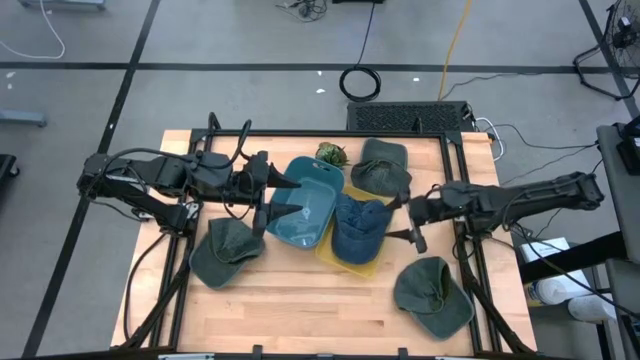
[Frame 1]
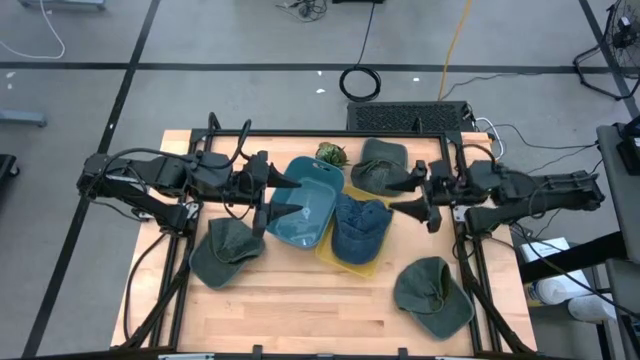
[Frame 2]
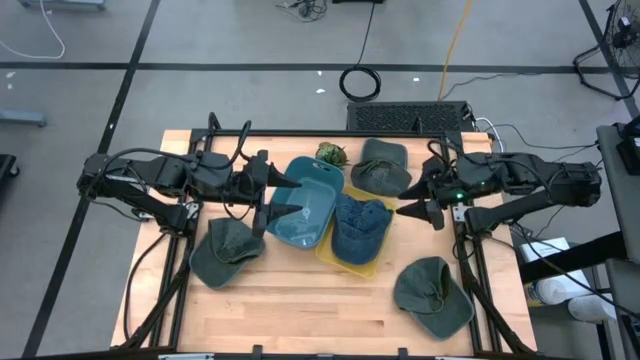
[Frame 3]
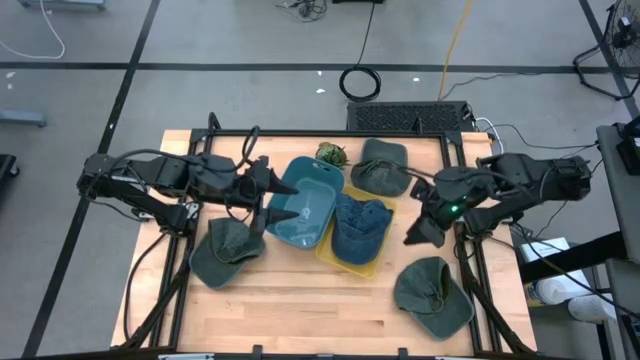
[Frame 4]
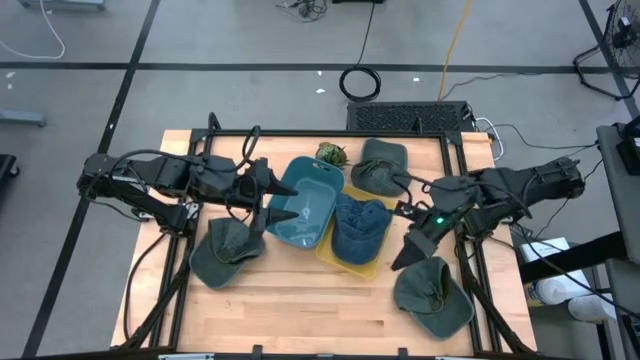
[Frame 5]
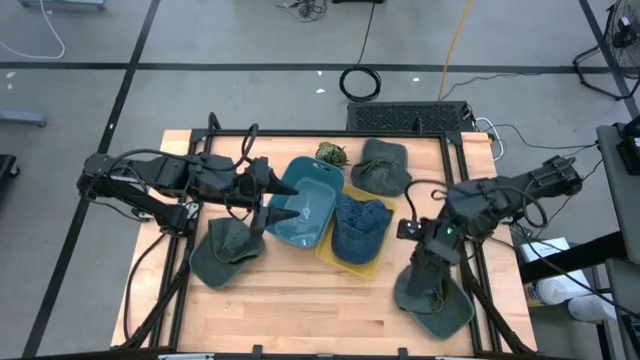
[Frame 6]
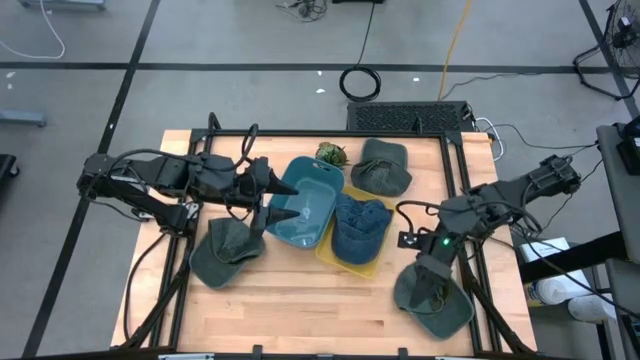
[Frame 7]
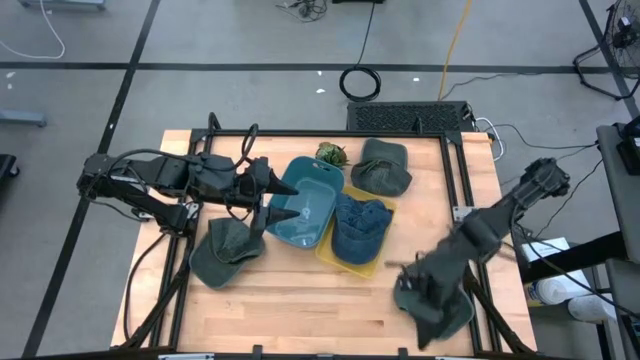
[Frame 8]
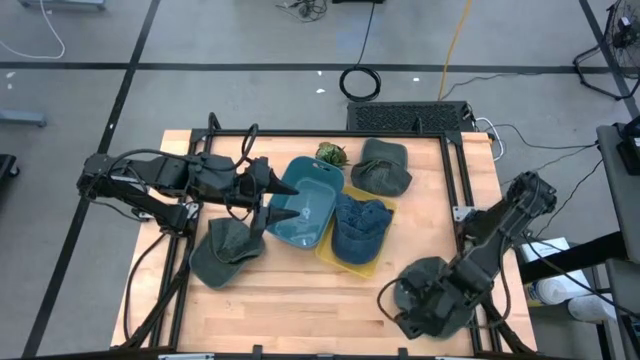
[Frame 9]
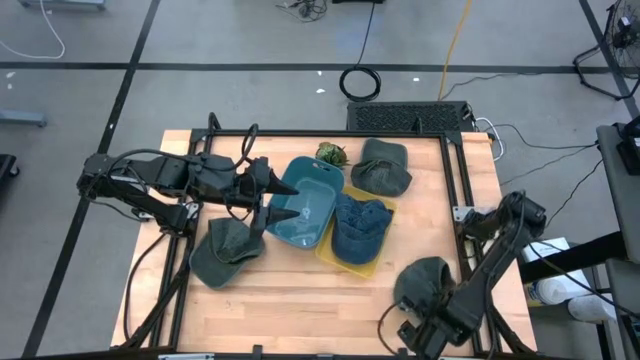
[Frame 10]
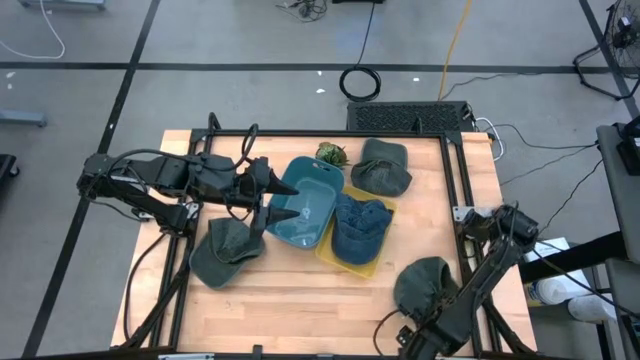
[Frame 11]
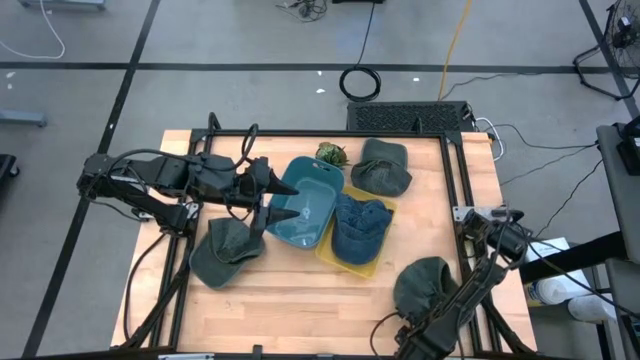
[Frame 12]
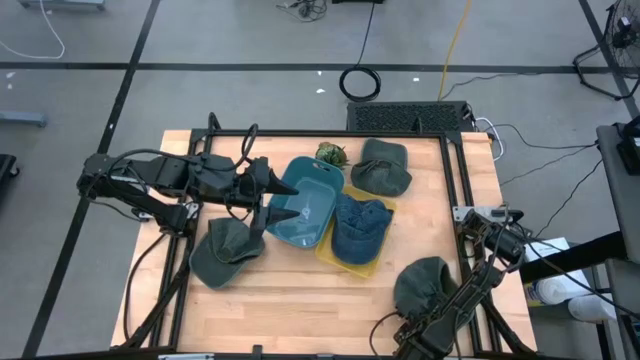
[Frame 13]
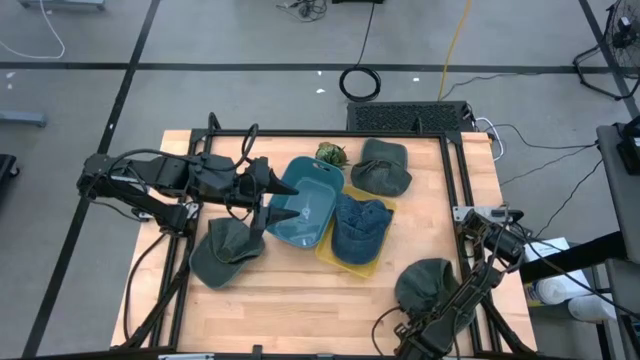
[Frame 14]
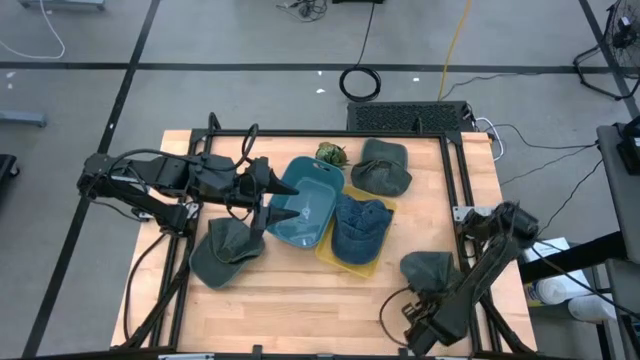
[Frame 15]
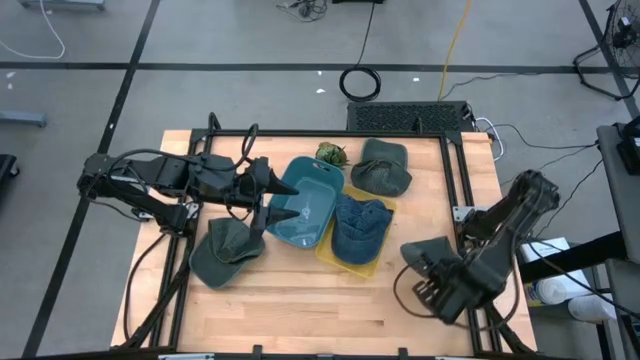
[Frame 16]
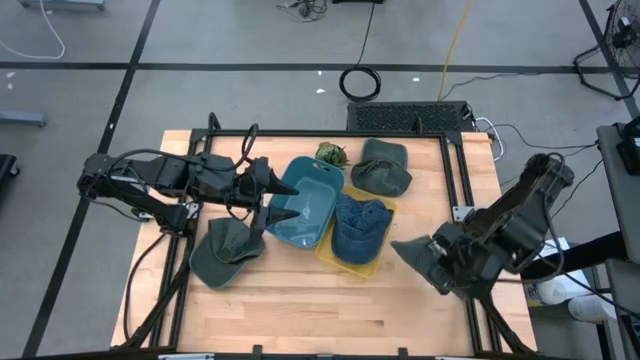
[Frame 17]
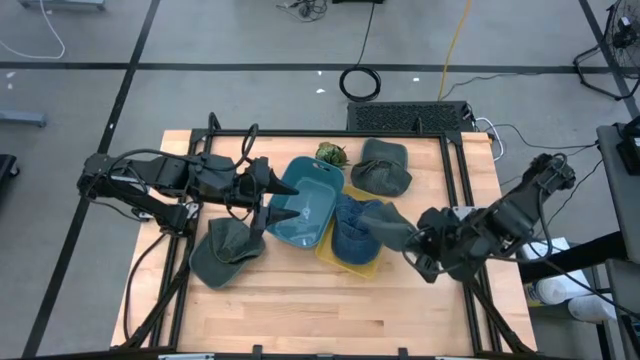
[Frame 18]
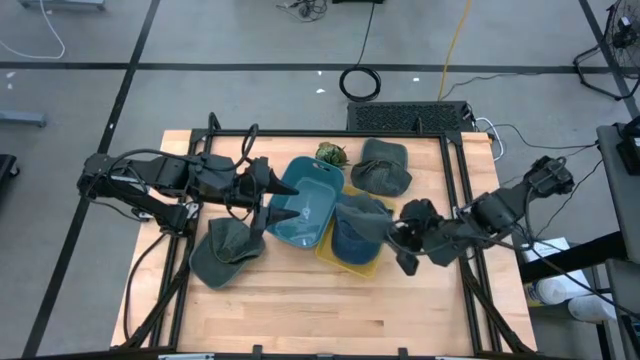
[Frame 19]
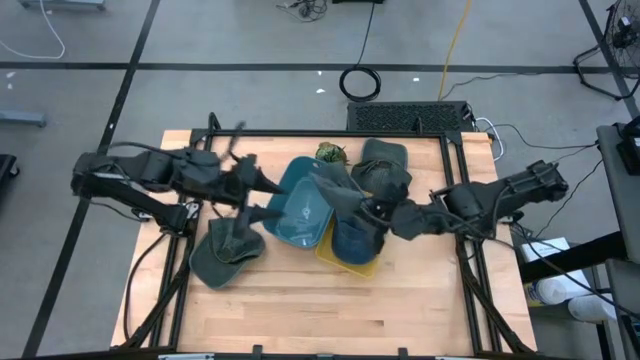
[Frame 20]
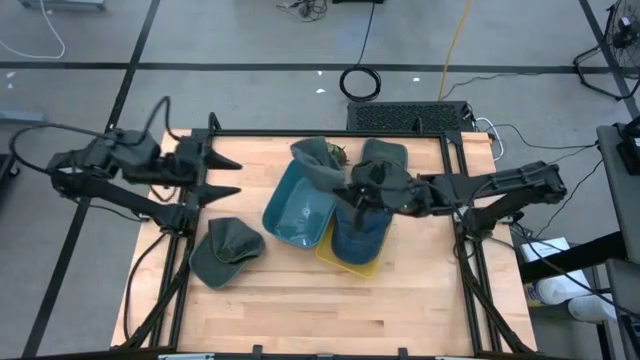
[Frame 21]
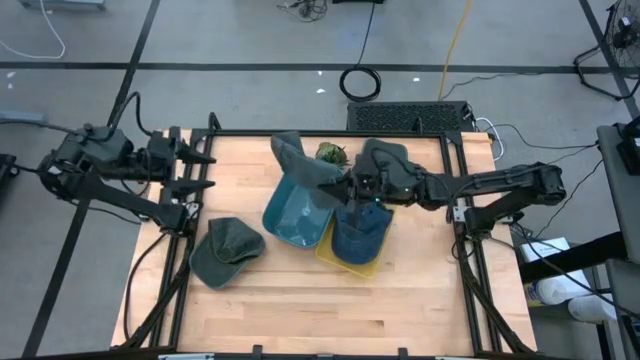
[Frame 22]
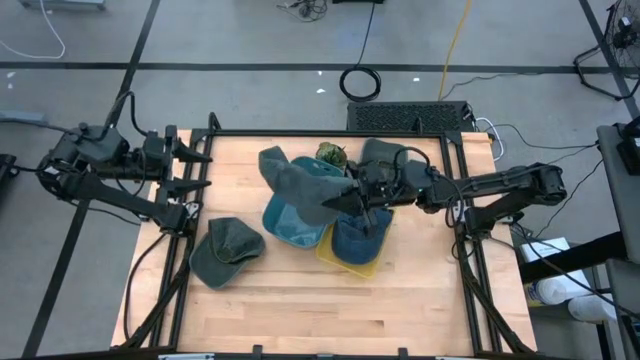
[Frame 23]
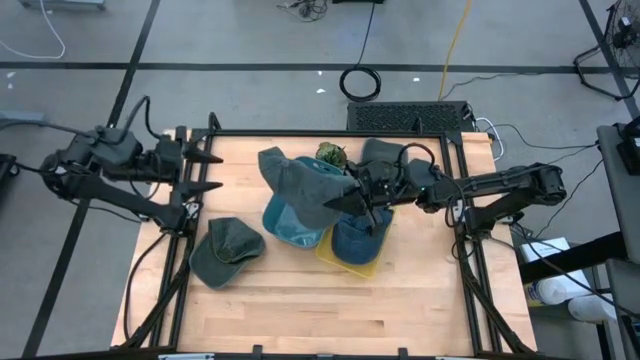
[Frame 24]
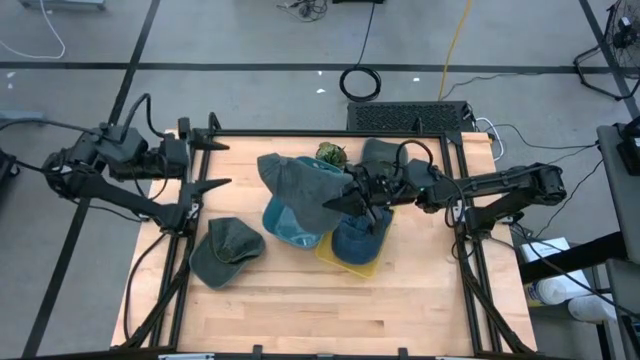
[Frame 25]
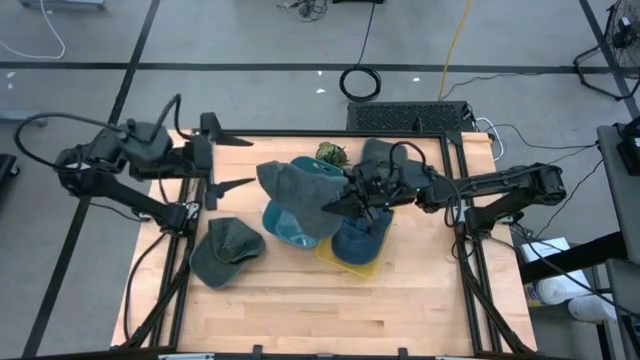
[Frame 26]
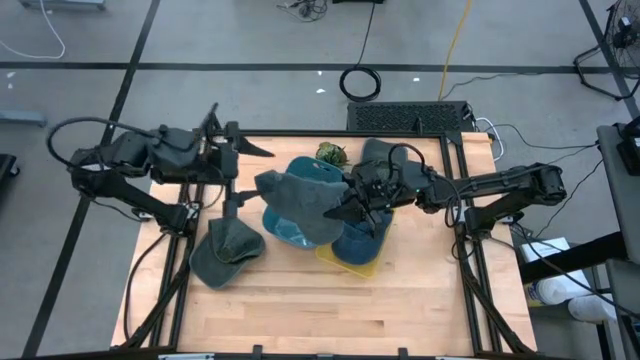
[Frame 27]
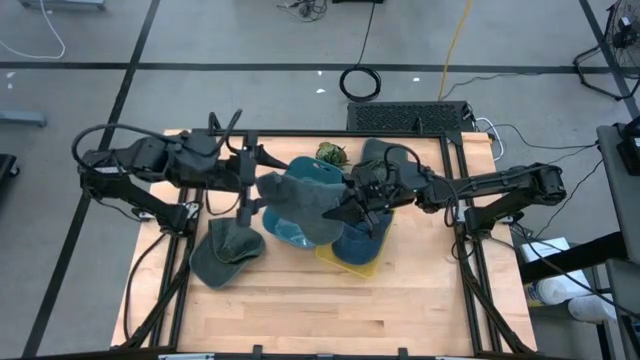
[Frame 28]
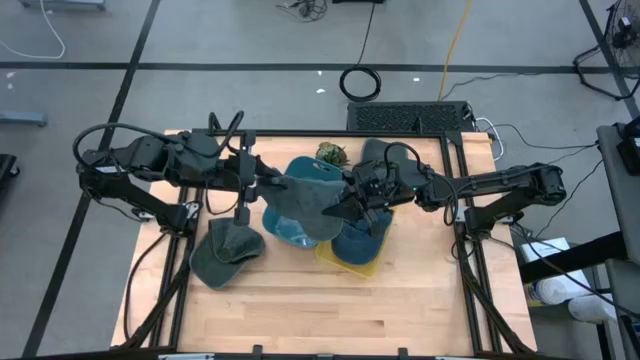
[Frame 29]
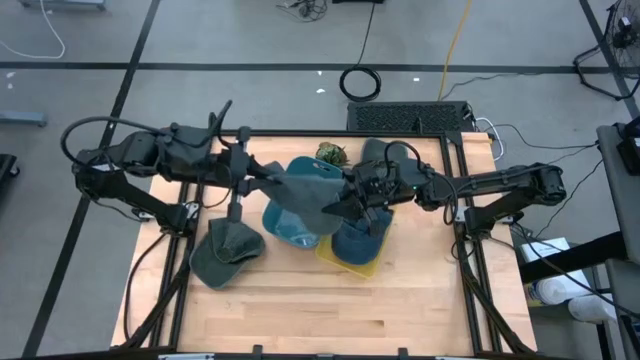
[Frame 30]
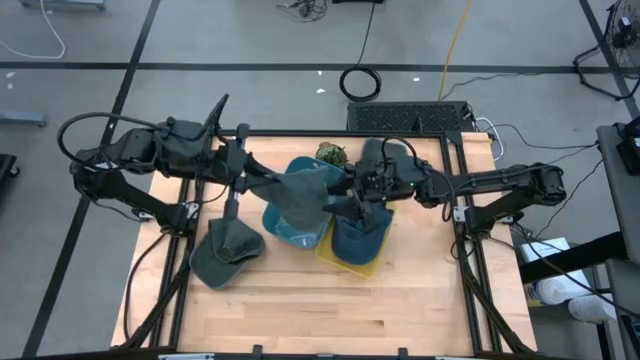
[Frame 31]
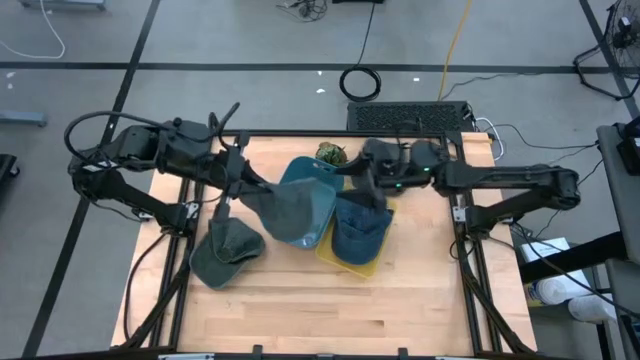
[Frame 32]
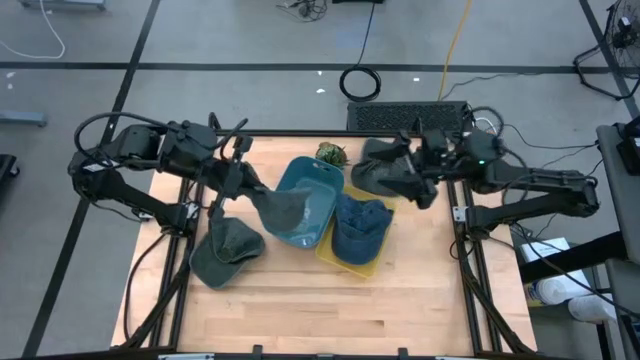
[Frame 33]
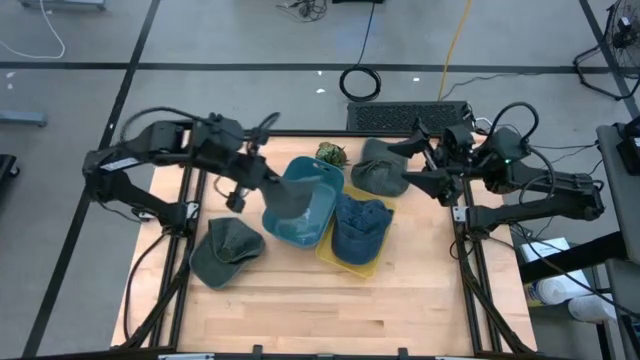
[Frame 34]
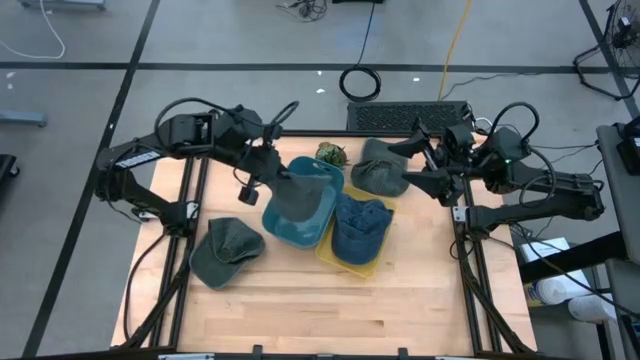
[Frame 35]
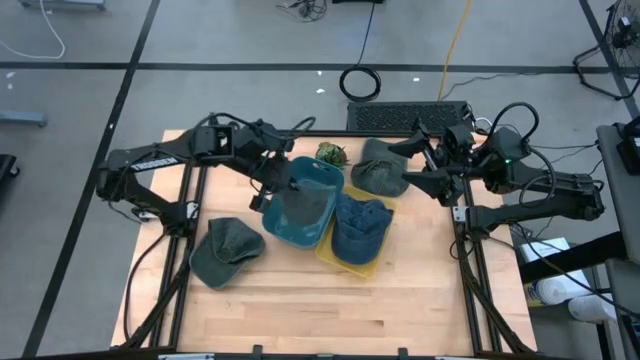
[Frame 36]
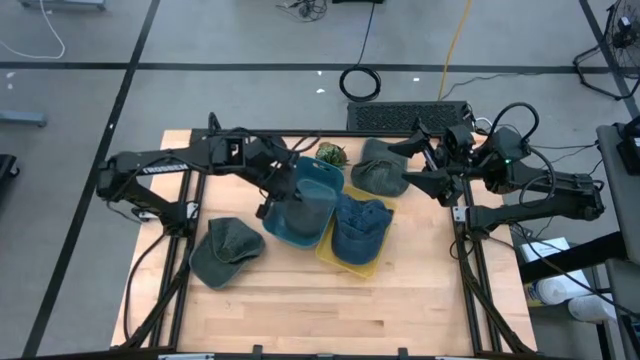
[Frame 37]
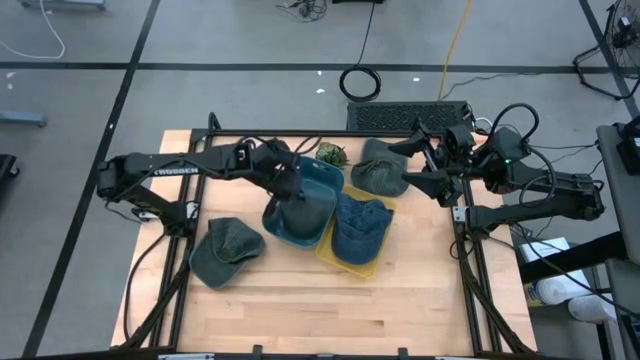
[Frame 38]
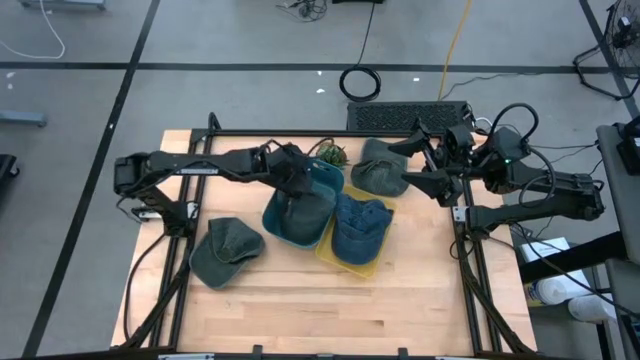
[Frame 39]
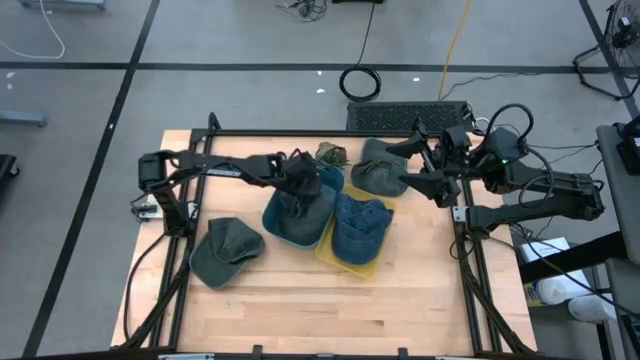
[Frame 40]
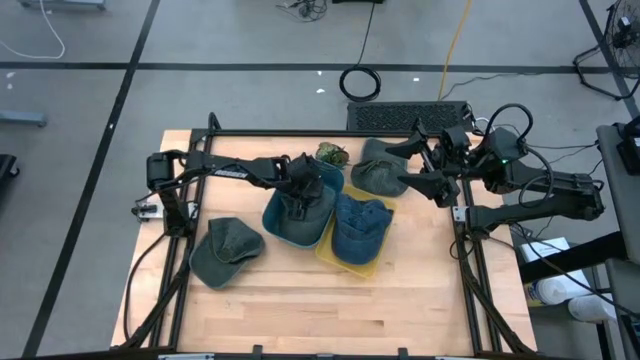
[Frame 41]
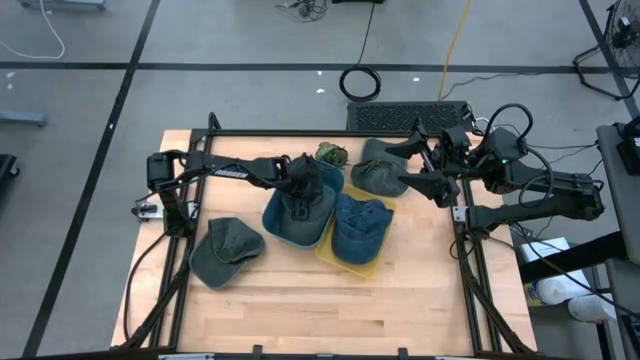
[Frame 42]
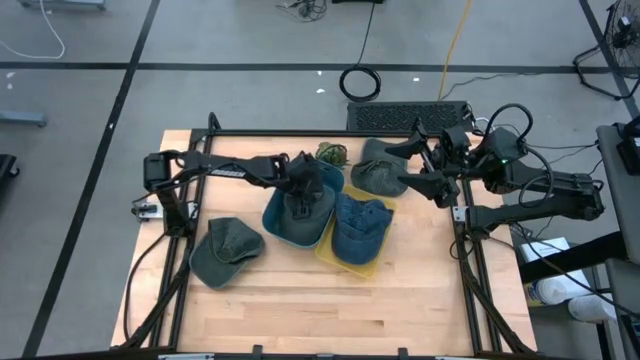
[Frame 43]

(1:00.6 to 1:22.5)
Task: Pick & Place hat
Put the bottom black cap into the blue bin
